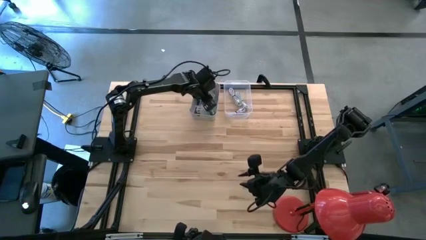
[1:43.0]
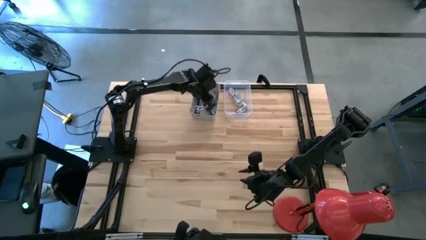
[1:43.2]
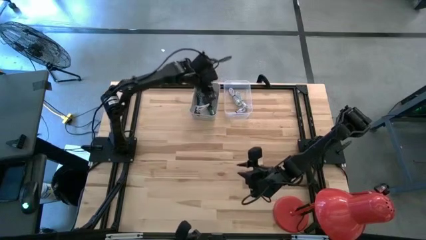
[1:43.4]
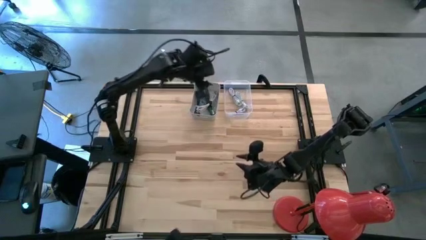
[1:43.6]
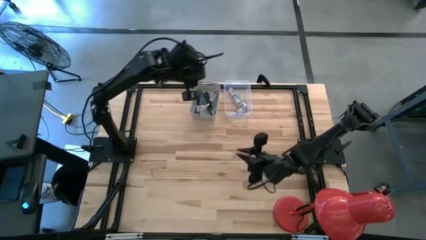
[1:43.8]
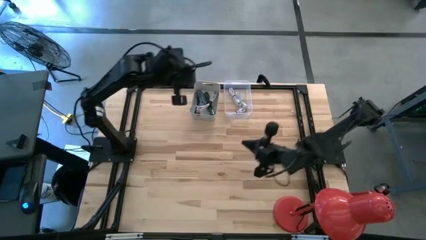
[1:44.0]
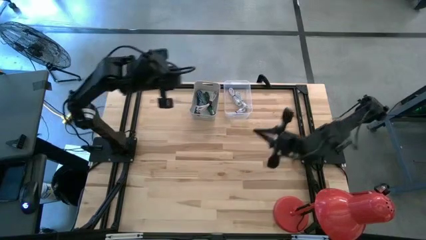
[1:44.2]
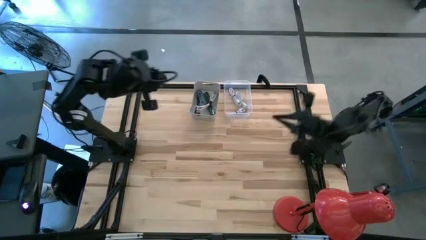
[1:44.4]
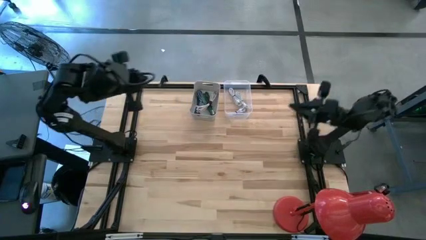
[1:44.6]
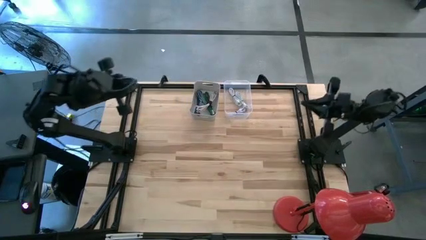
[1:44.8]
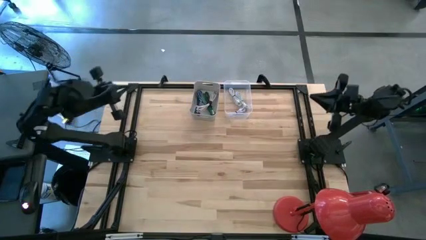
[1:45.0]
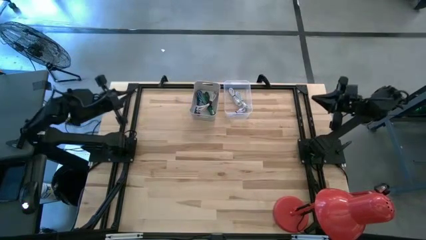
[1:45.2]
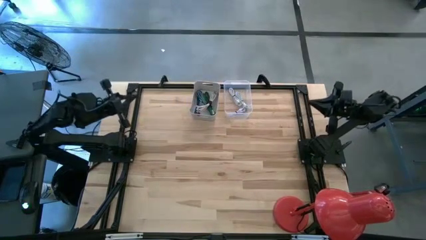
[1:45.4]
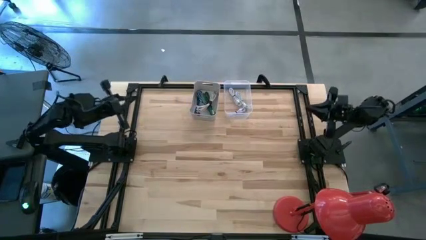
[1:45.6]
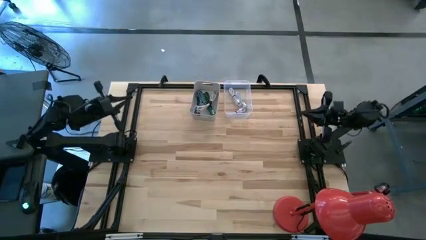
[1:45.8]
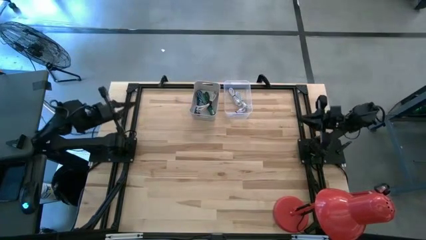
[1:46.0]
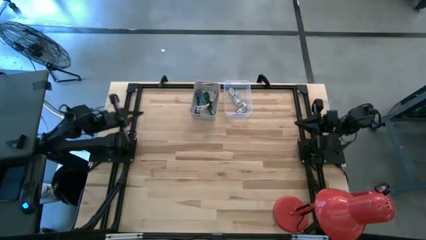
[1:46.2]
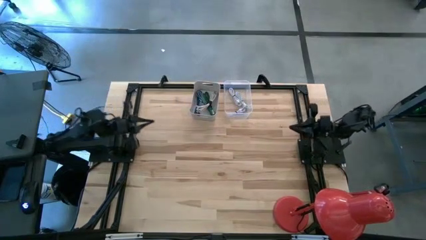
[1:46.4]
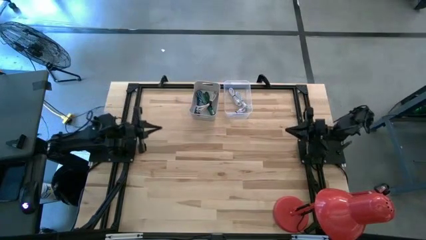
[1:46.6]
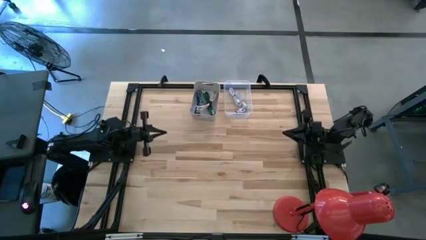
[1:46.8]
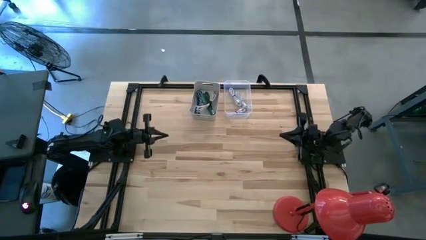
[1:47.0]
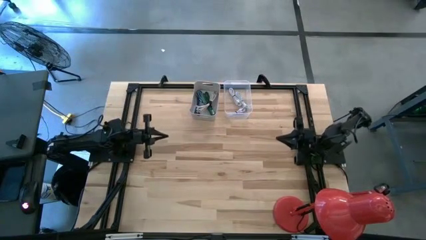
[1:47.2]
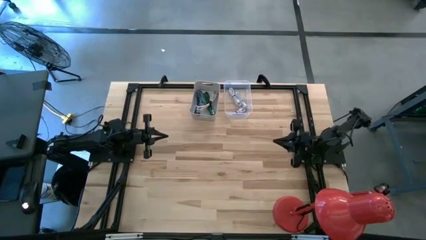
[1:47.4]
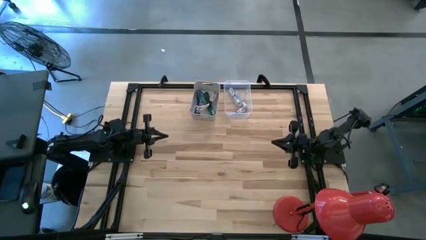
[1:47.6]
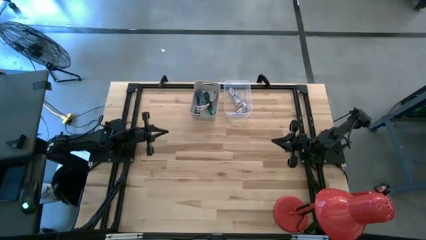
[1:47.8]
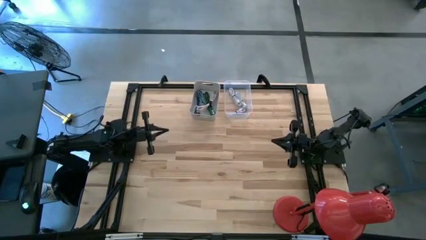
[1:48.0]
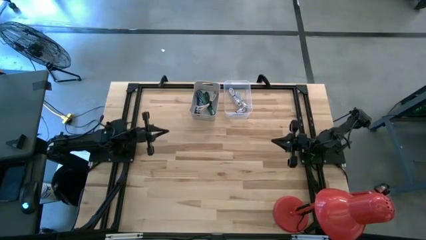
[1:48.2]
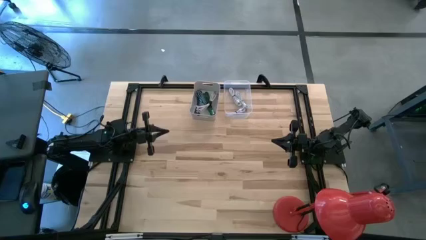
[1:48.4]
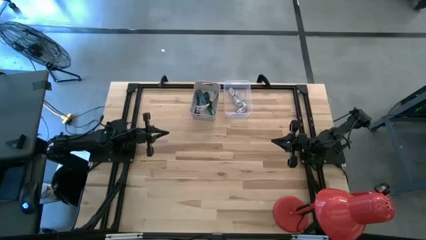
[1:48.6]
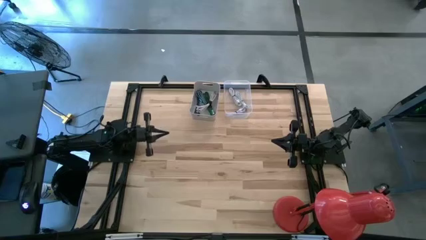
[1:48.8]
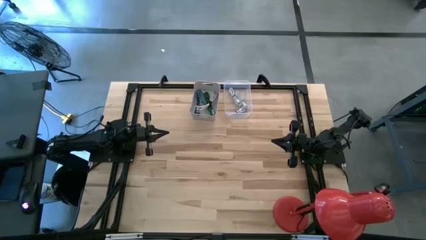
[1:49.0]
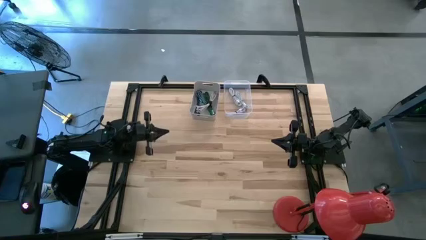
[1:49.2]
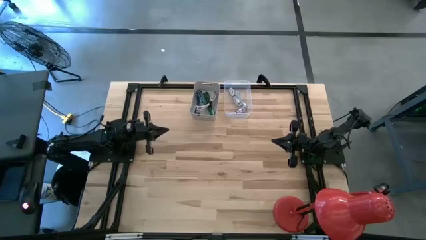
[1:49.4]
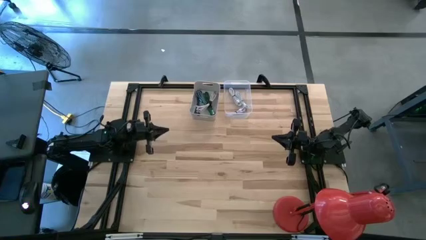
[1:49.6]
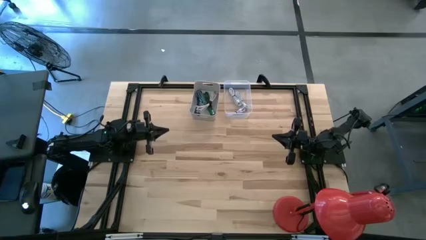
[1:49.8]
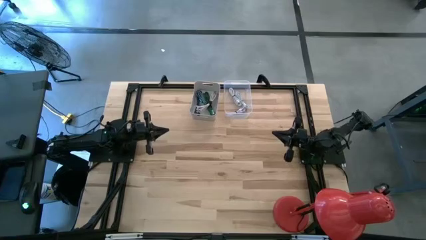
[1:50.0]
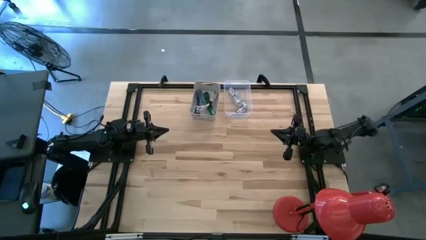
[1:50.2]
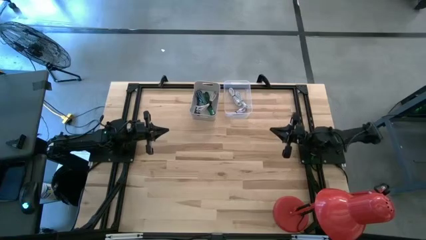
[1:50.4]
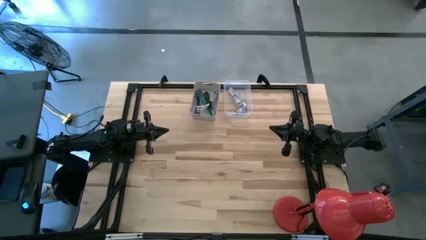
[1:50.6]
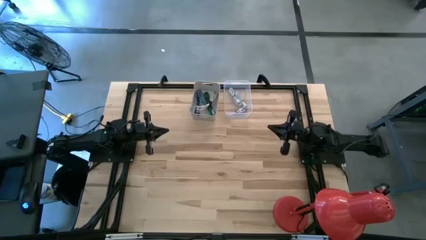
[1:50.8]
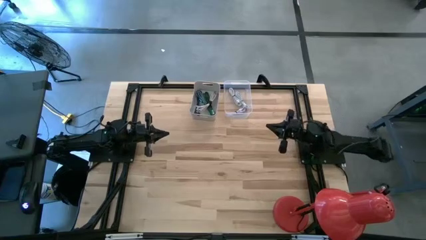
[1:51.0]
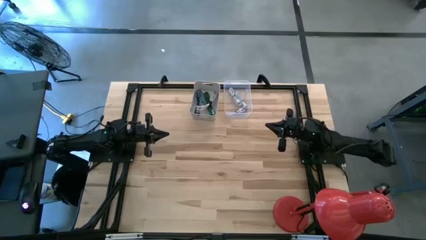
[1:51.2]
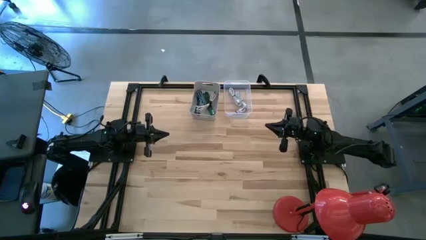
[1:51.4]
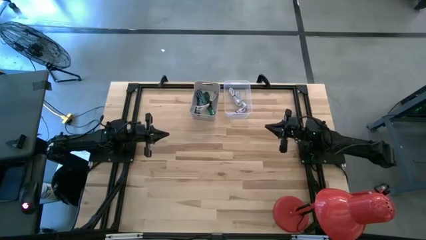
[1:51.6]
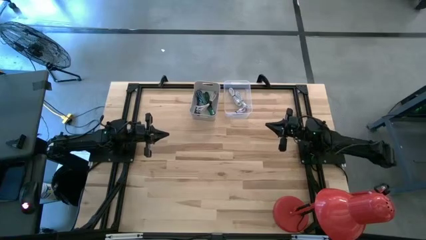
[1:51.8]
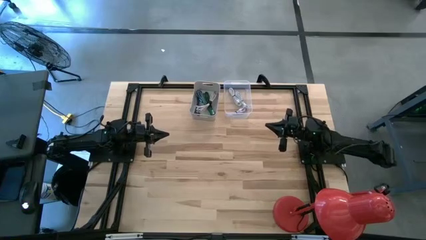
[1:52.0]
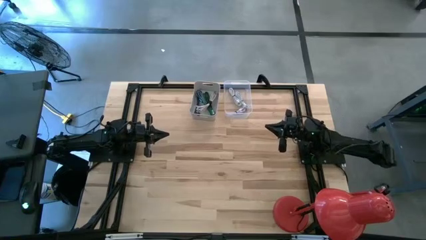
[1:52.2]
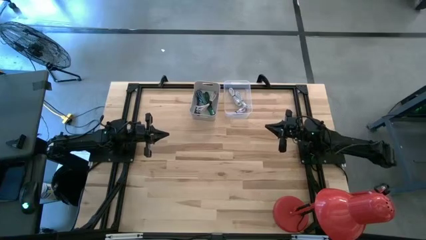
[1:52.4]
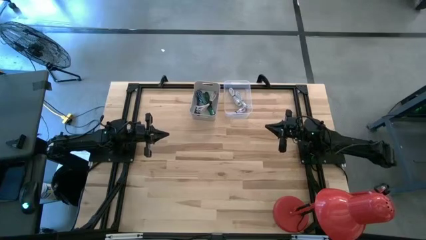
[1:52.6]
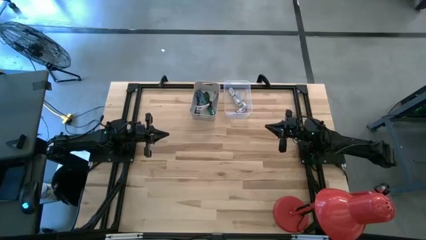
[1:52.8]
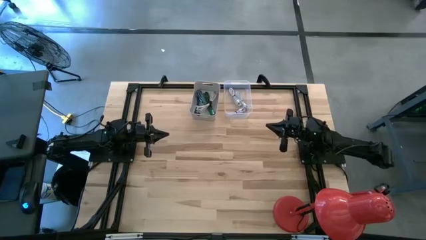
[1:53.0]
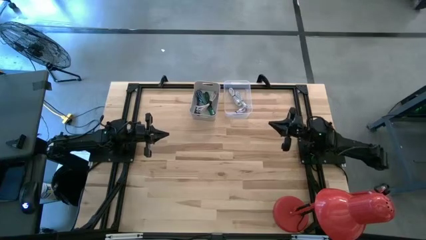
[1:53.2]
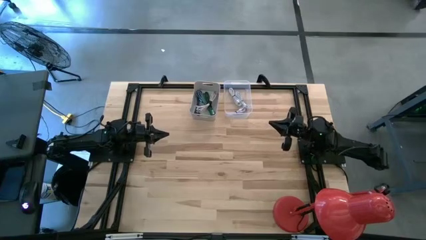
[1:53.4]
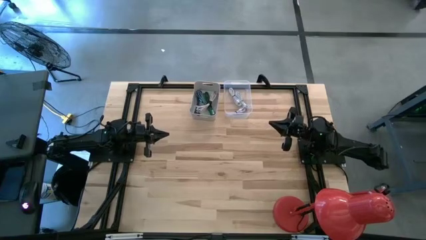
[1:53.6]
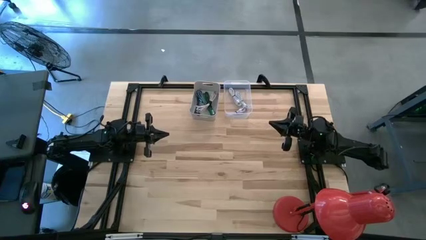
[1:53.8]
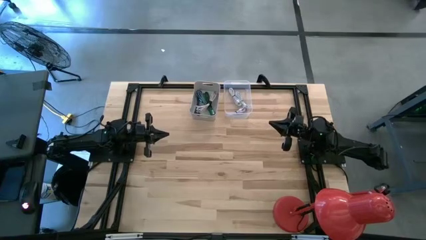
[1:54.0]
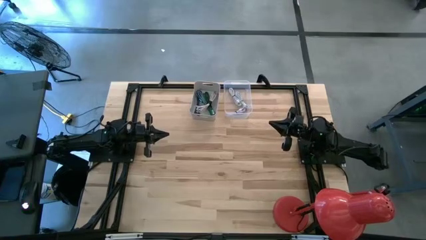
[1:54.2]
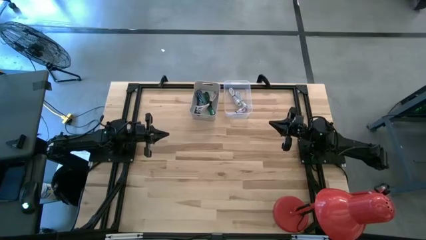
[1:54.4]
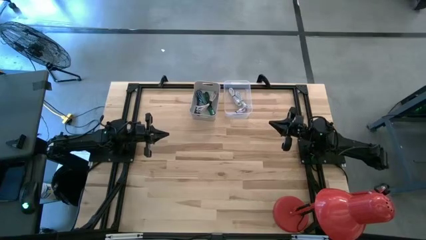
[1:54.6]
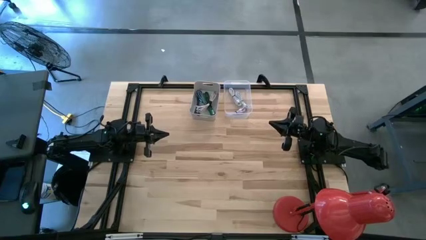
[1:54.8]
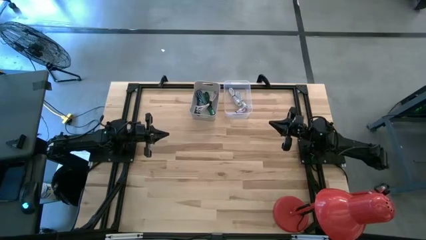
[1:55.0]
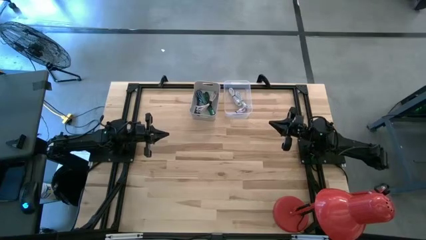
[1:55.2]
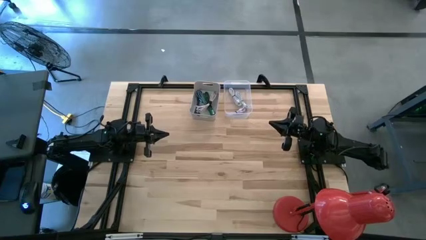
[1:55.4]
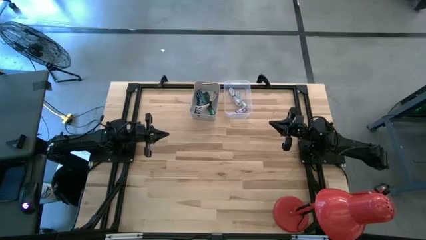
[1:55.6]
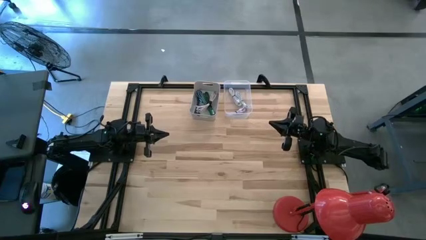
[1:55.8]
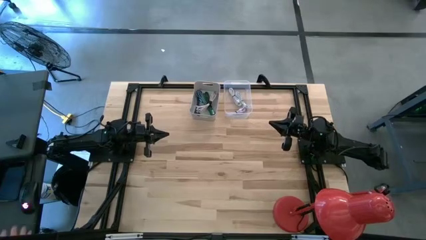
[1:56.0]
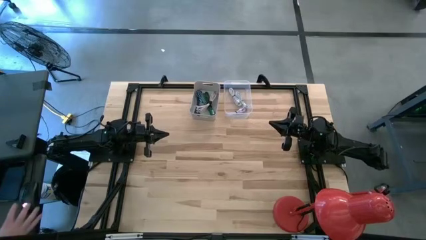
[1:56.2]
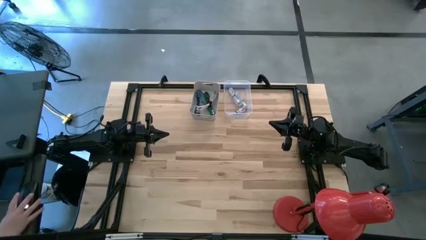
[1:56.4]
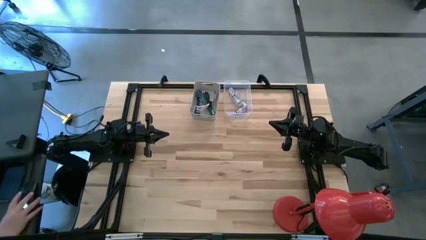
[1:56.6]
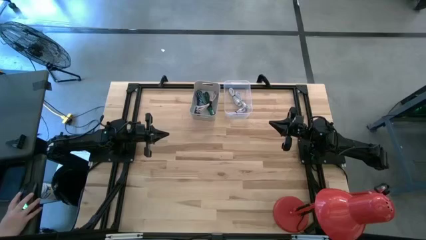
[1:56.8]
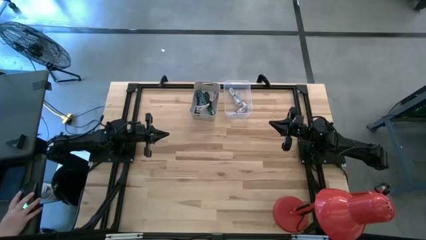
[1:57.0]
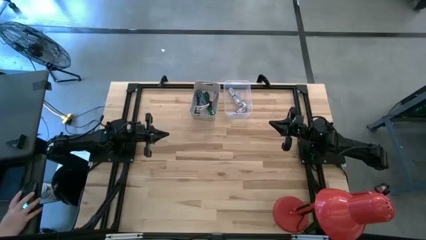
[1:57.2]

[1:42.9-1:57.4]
Task: Pick & Place USB Port
Return to Home Position
